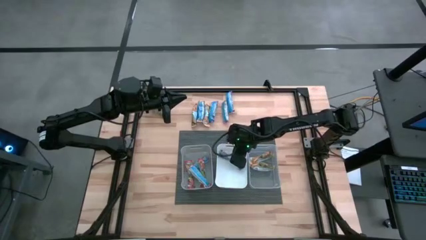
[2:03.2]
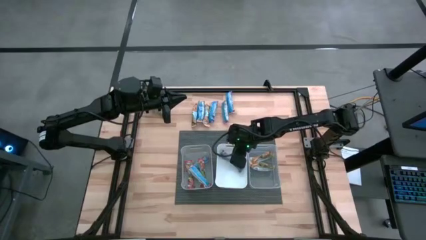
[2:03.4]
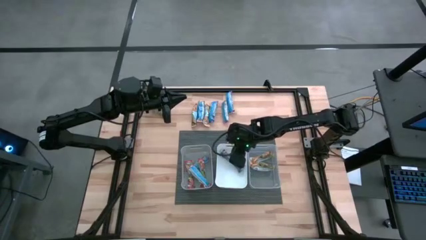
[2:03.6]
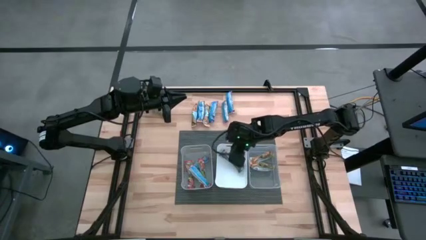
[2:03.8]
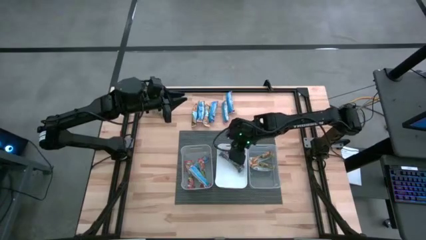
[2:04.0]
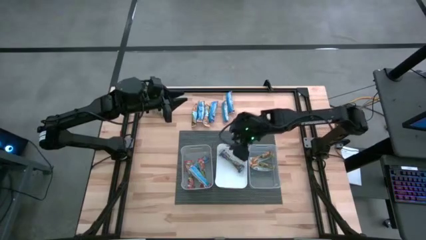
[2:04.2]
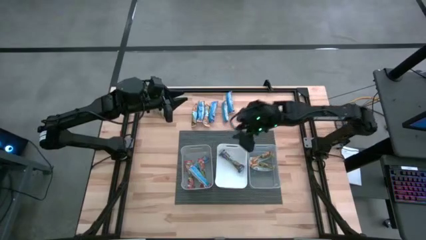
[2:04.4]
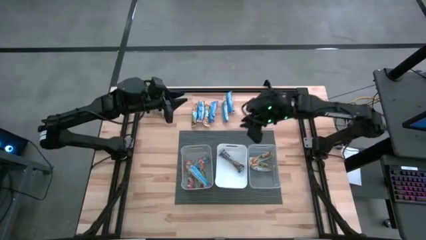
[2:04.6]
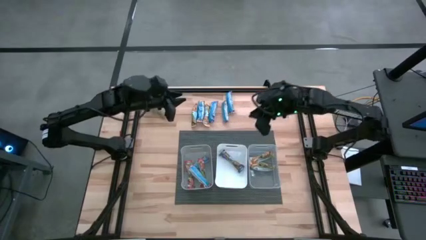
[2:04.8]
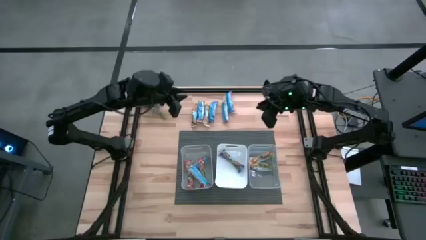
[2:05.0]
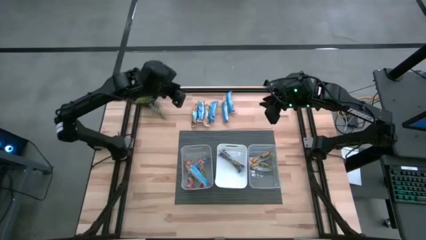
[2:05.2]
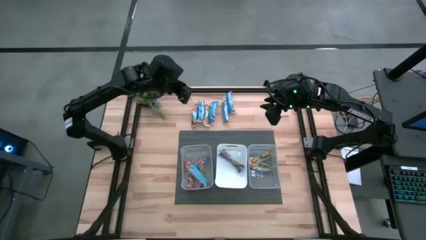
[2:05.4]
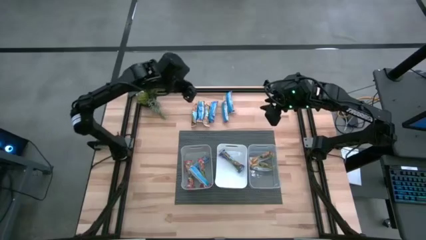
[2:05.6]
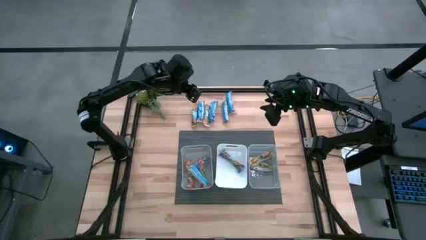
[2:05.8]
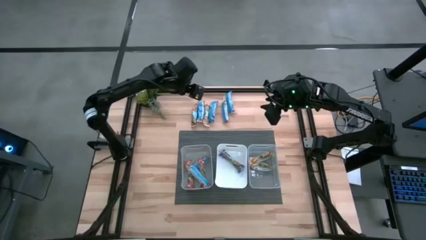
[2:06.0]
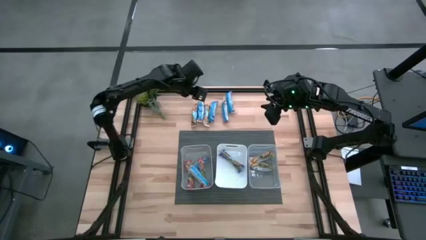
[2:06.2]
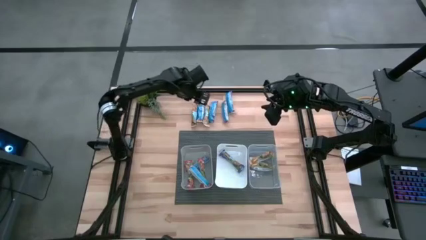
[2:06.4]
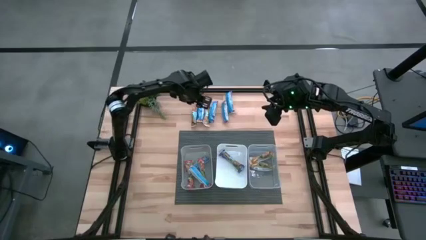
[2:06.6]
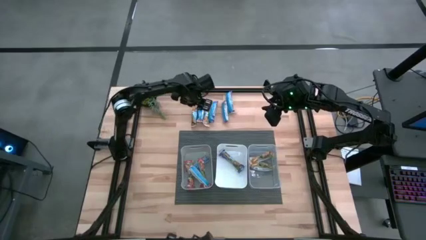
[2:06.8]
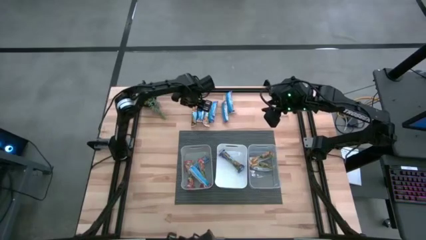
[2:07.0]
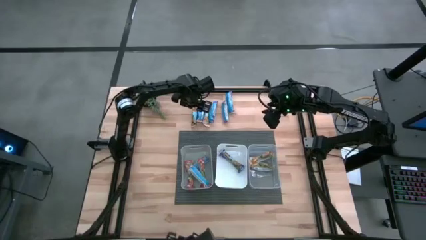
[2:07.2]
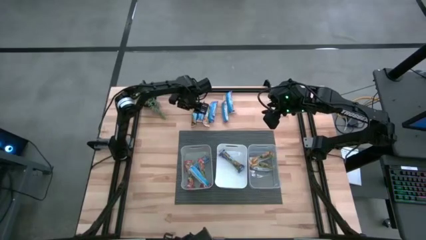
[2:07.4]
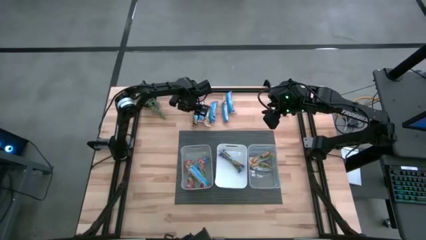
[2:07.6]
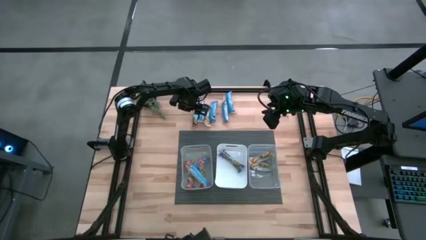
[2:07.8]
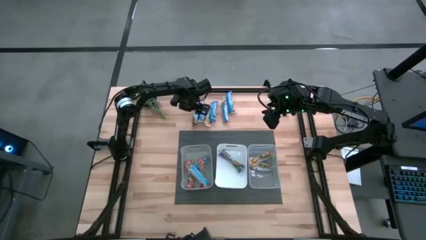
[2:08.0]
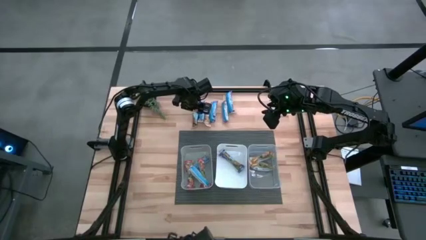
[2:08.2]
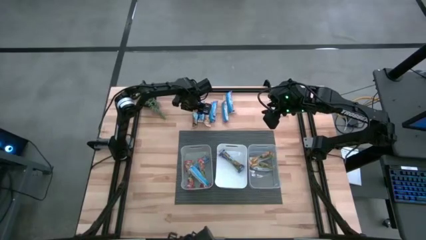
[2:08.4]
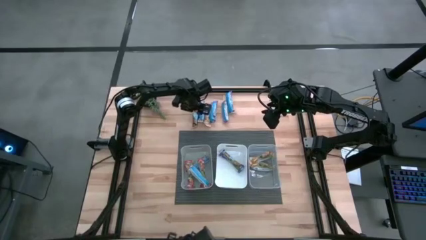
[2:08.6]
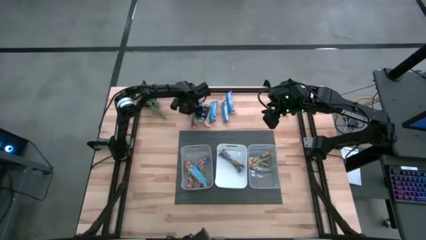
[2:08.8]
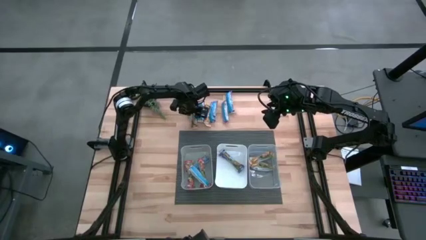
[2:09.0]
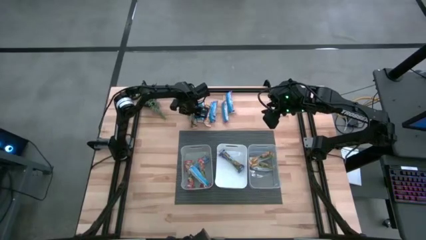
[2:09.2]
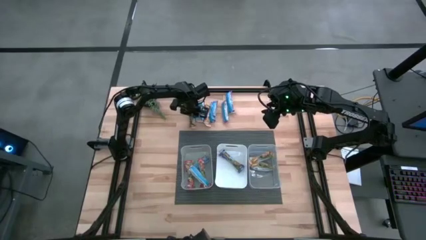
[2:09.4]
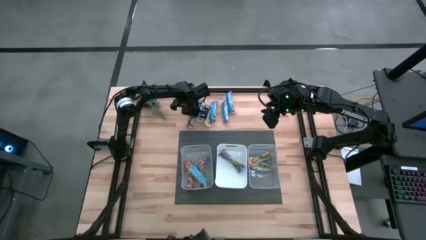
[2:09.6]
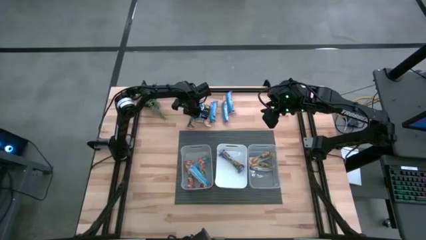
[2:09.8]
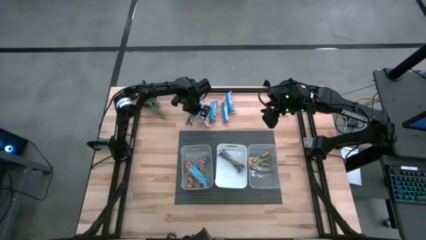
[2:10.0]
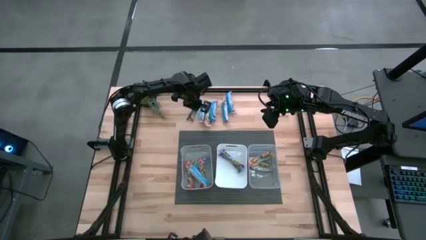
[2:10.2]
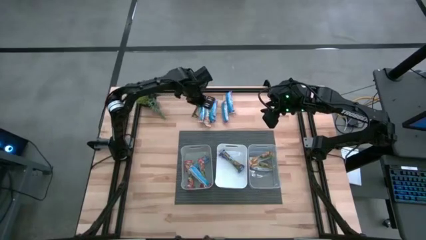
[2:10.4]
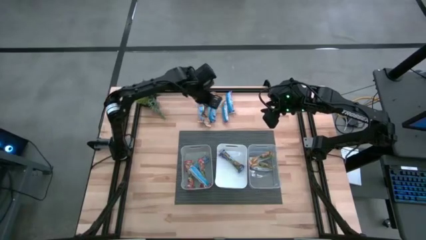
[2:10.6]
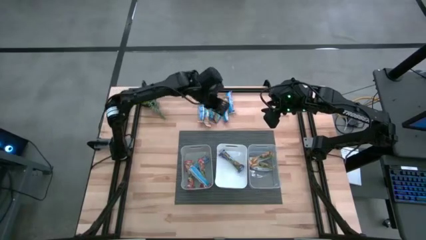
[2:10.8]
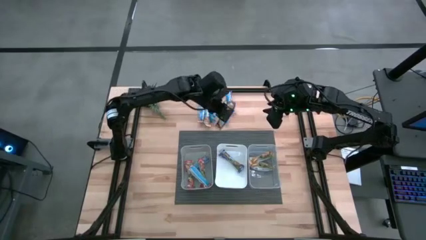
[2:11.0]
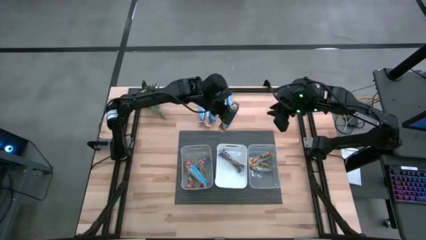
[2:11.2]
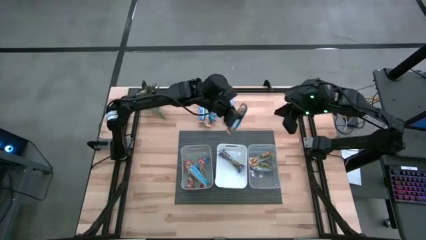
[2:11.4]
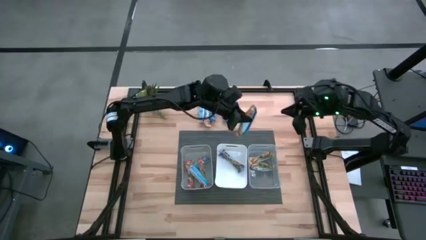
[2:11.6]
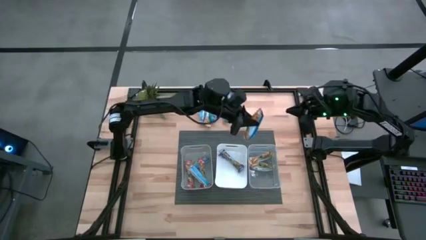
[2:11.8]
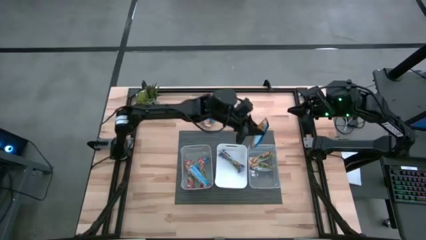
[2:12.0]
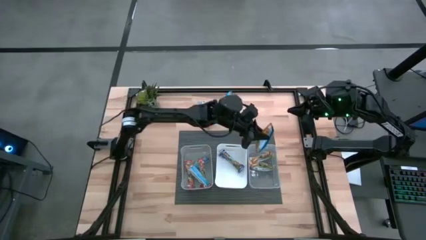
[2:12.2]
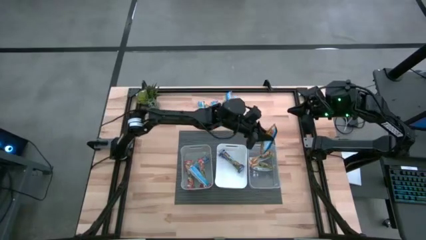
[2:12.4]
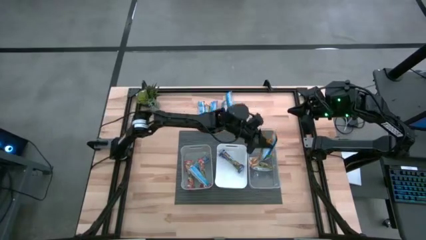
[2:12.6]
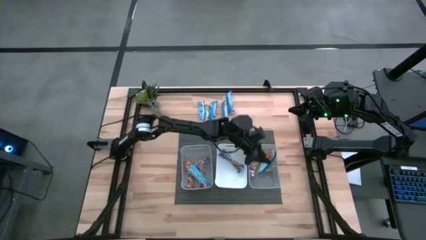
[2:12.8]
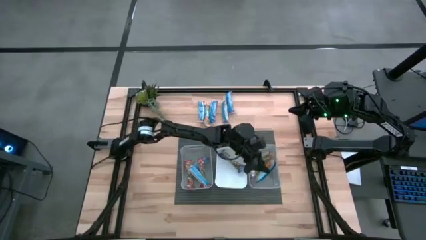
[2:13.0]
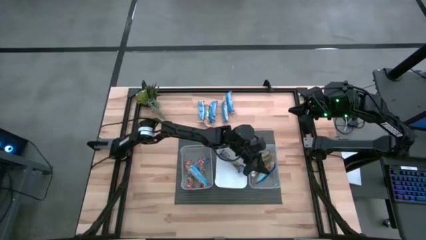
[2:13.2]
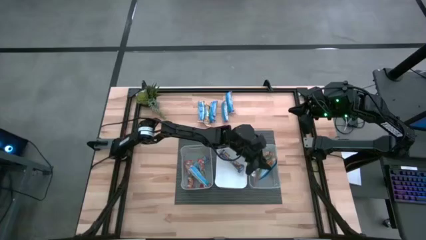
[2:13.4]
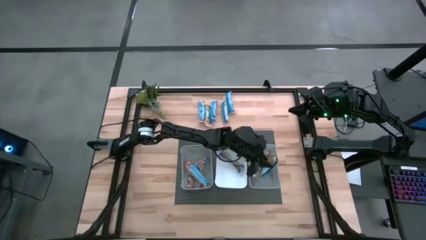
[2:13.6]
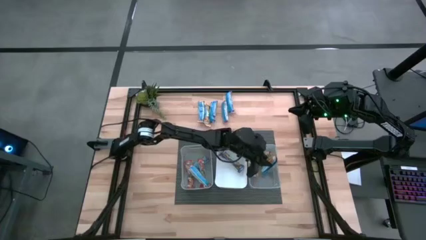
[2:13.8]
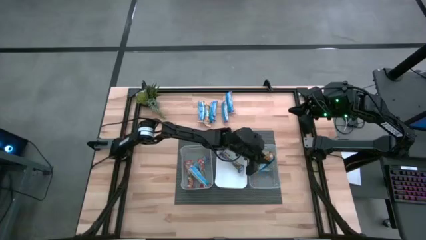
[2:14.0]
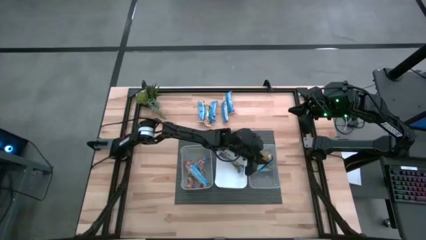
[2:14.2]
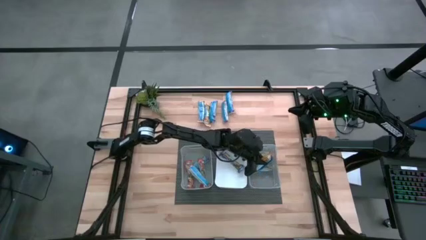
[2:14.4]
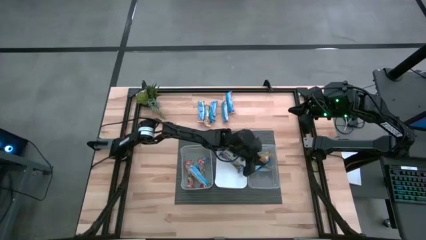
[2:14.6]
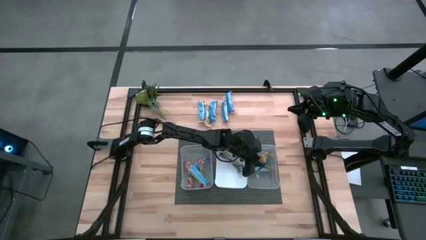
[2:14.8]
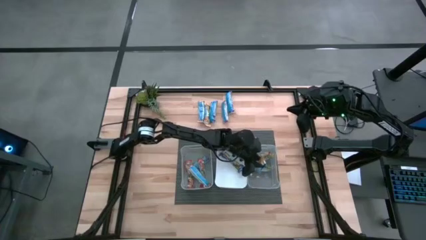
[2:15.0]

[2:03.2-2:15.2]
Task: Pick and place Granola Bars by type
Put the orange granola bar into the transparent bin

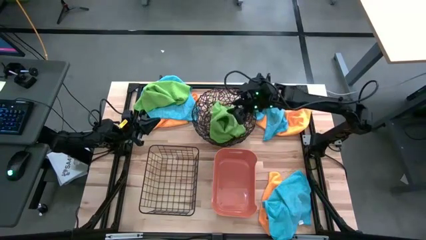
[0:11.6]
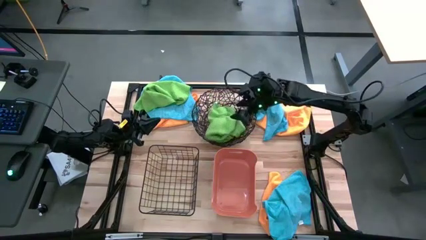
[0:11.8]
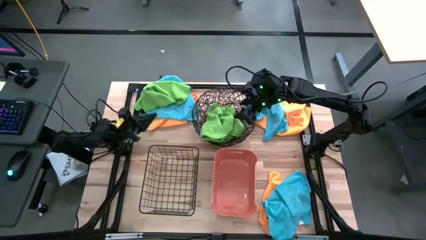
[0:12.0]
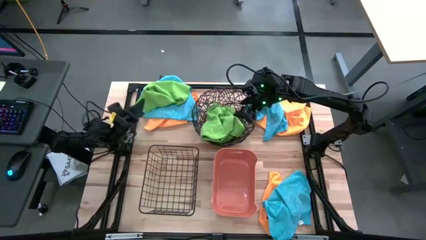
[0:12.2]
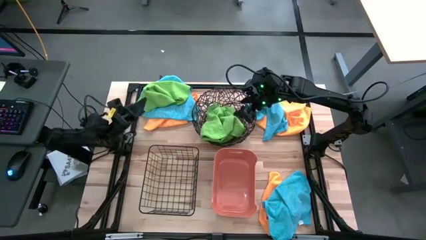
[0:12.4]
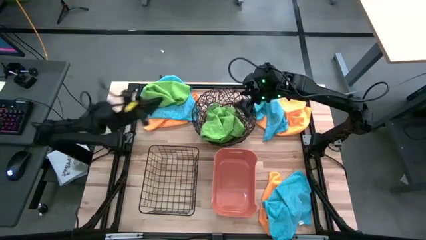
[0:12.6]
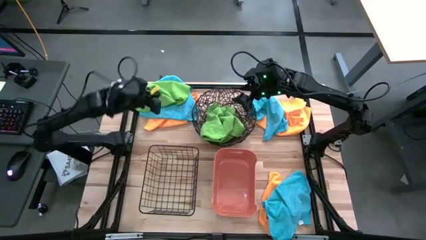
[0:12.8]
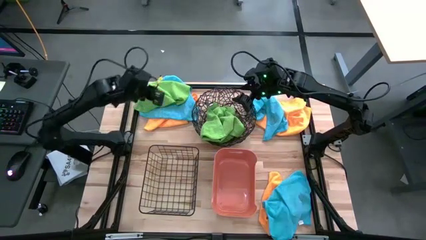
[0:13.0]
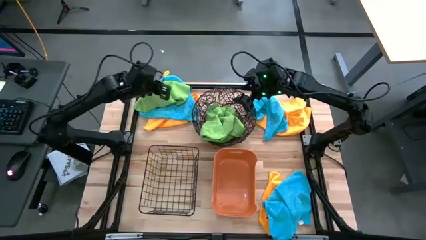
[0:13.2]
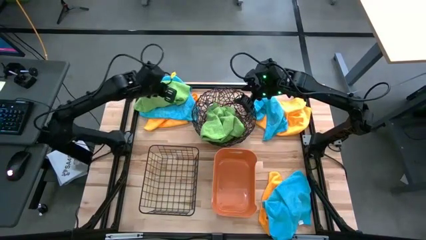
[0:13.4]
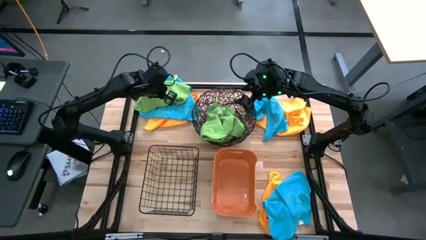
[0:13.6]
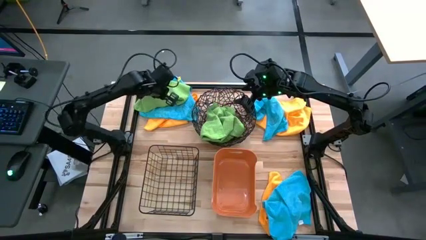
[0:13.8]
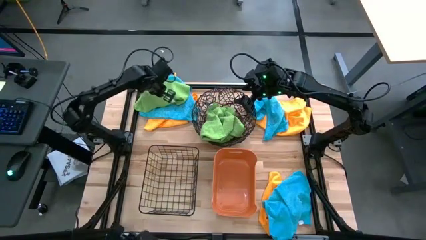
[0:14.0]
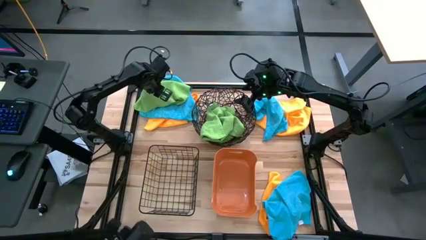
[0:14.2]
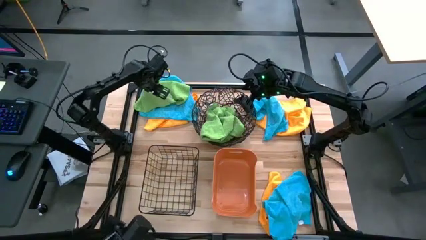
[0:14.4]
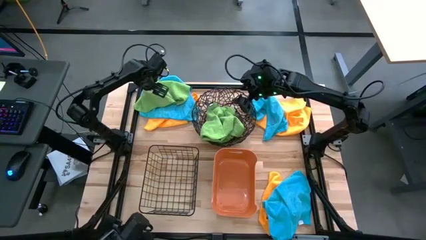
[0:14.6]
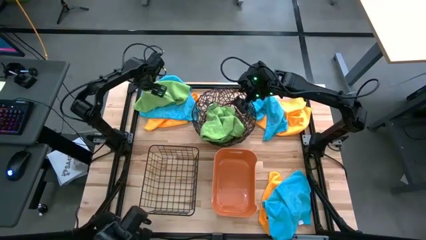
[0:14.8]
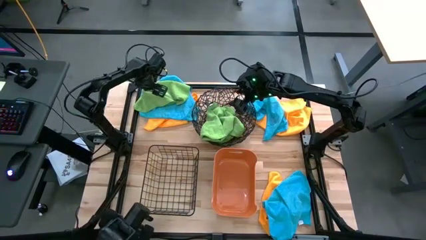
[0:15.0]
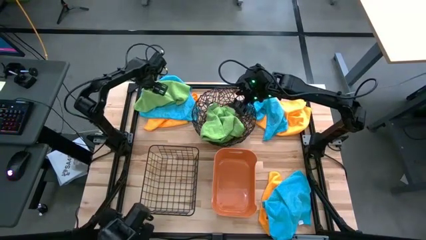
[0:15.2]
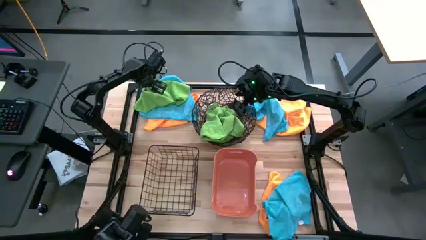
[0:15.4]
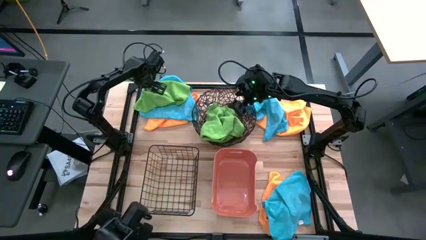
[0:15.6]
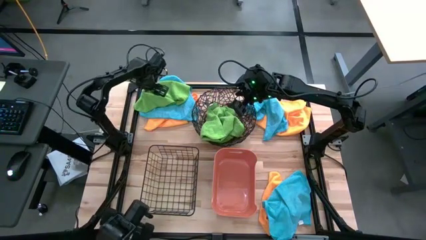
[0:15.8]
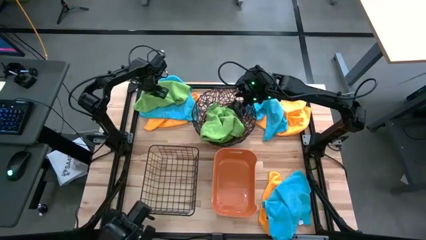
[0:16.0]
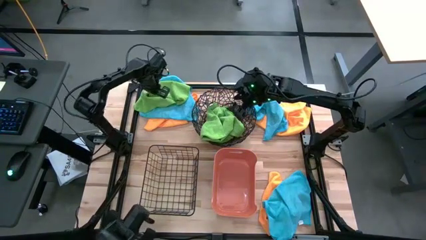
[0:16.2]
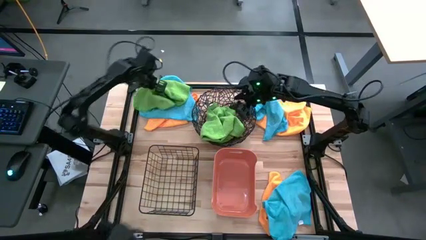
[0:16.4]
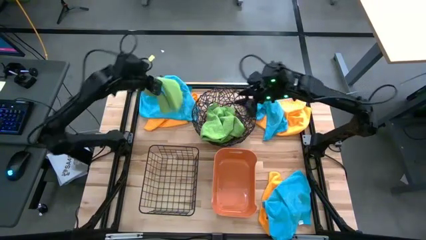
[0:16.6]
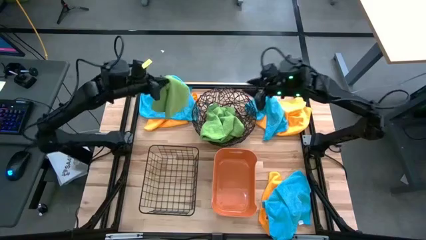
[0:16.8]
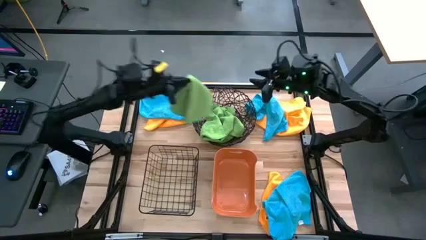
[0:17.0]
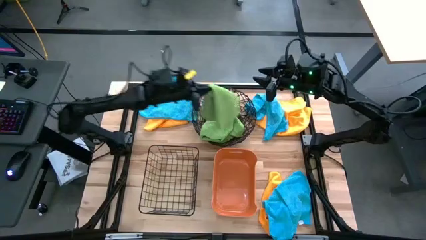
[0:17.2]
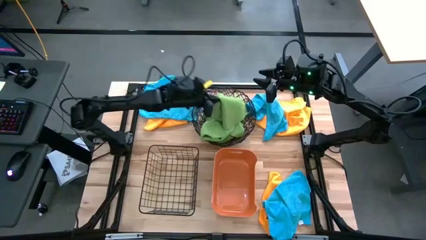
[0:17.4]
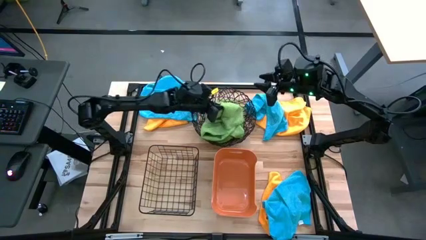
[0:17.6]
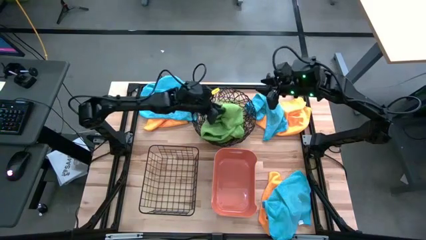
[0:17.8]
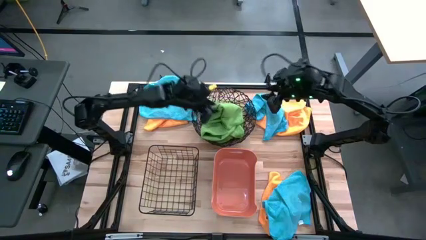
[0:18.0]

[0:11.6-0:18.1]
Task: Sort microfiber towel by color & place in baskets
Put the green microfiber towel into the black woven basket
